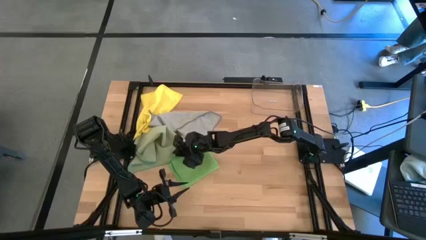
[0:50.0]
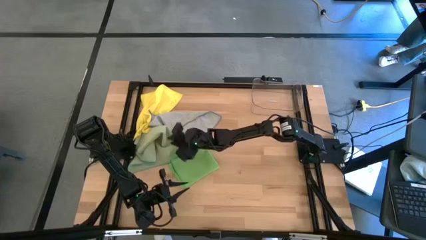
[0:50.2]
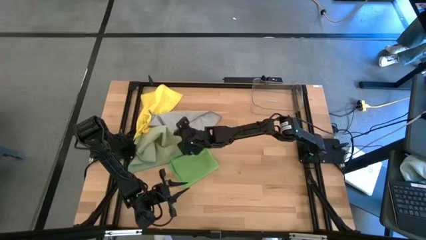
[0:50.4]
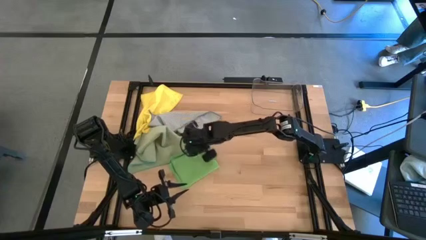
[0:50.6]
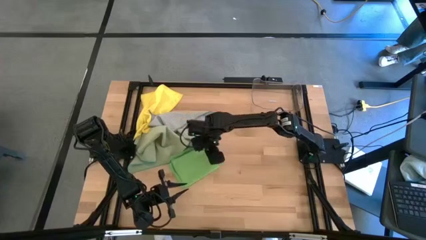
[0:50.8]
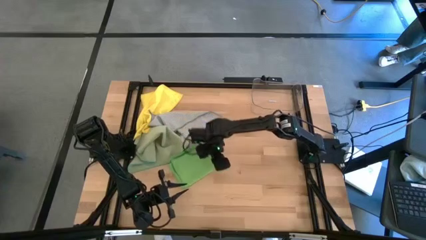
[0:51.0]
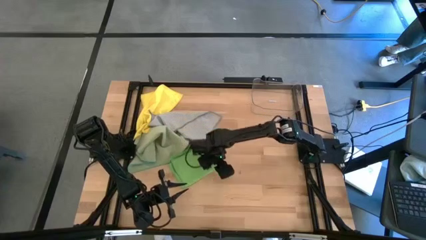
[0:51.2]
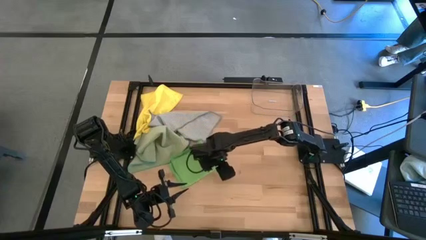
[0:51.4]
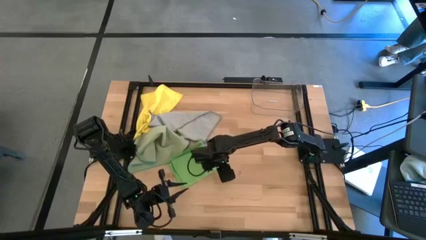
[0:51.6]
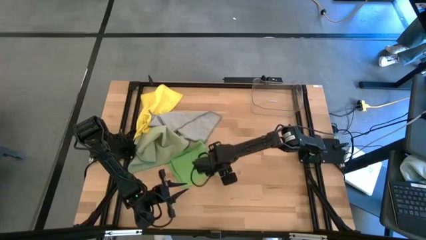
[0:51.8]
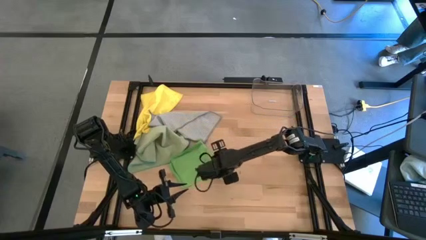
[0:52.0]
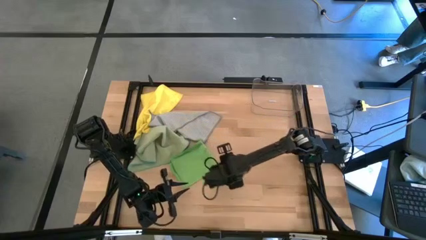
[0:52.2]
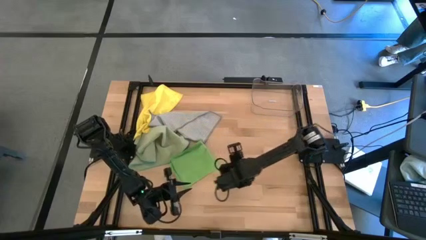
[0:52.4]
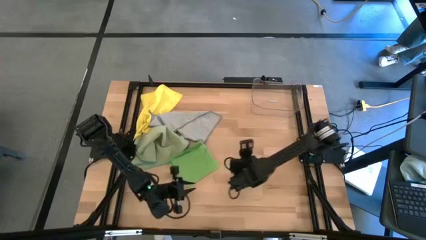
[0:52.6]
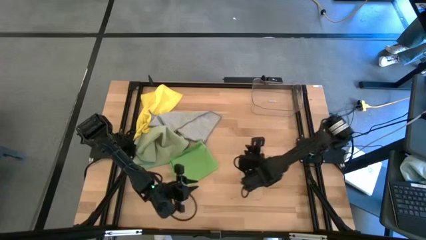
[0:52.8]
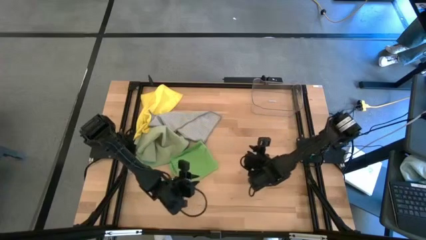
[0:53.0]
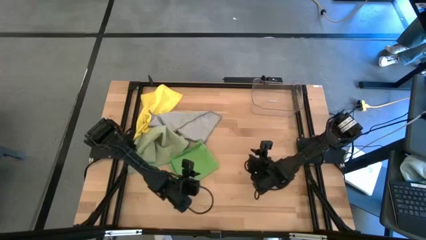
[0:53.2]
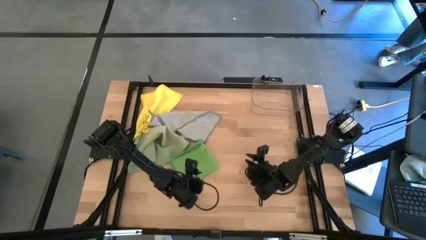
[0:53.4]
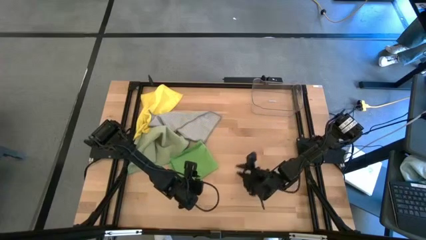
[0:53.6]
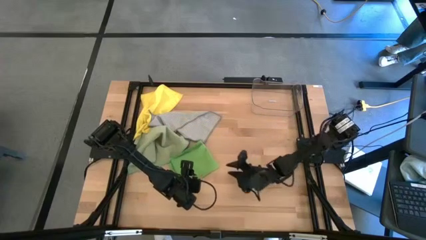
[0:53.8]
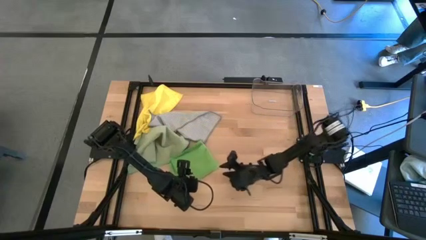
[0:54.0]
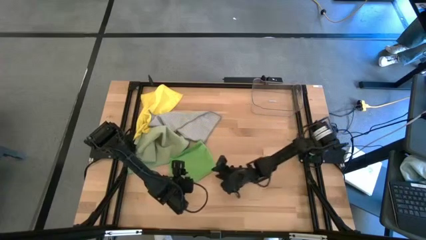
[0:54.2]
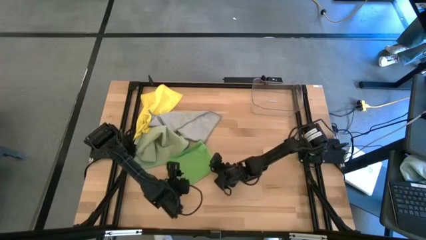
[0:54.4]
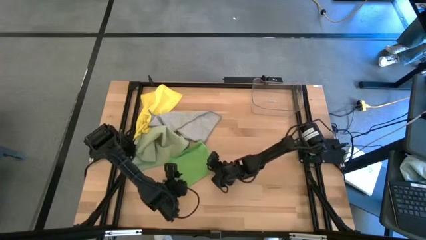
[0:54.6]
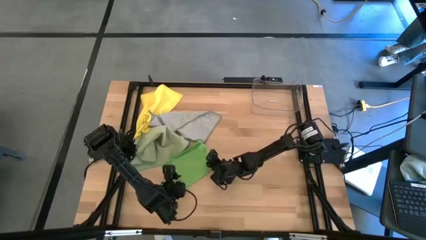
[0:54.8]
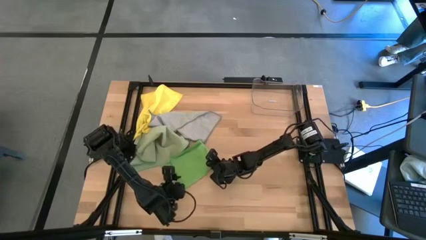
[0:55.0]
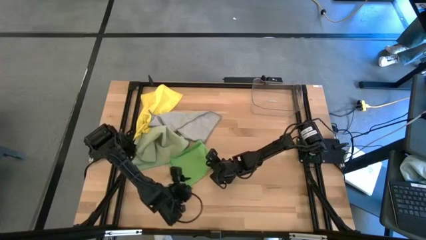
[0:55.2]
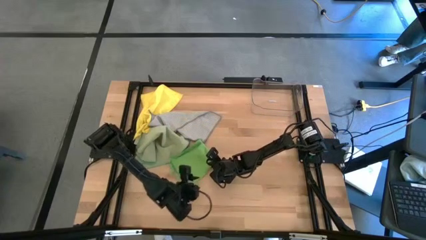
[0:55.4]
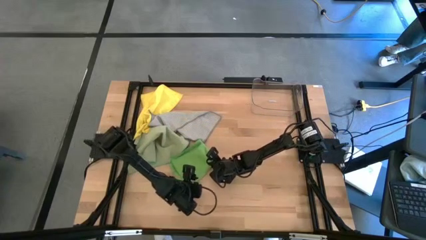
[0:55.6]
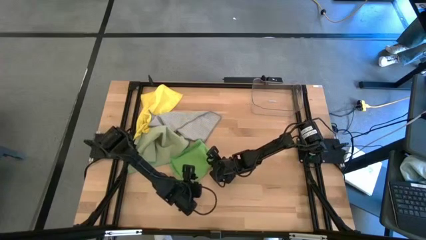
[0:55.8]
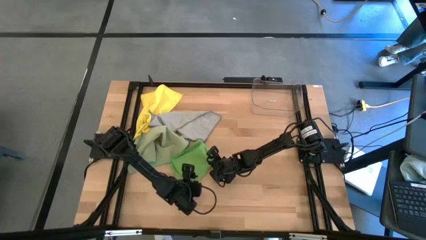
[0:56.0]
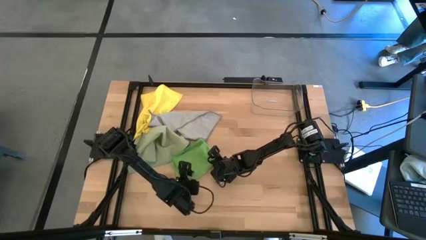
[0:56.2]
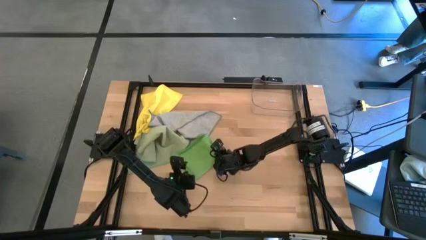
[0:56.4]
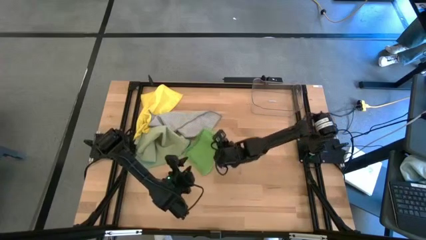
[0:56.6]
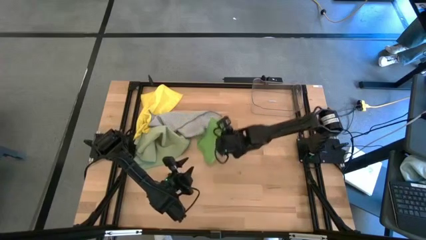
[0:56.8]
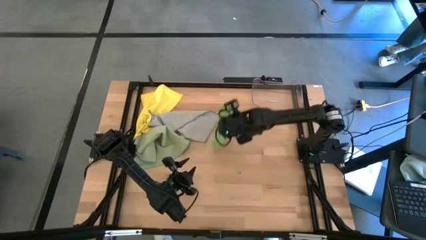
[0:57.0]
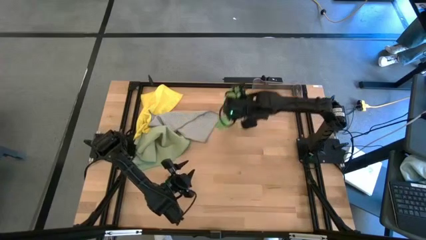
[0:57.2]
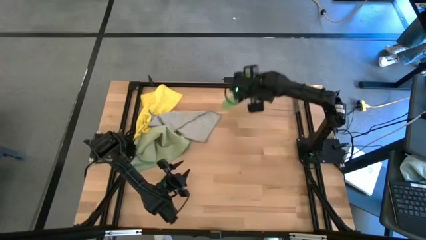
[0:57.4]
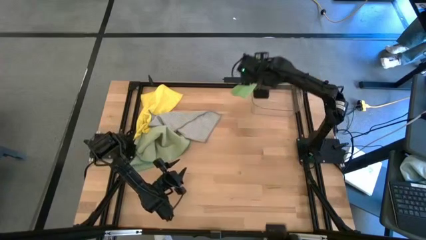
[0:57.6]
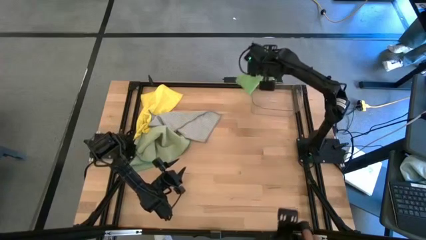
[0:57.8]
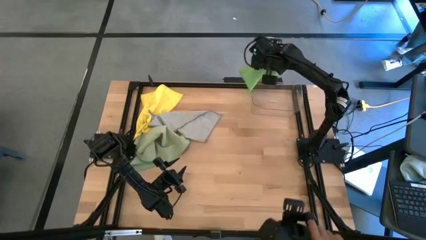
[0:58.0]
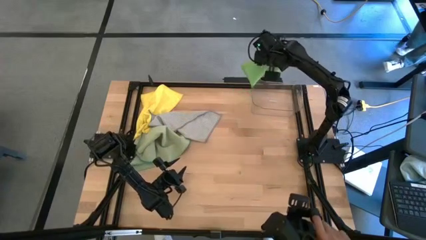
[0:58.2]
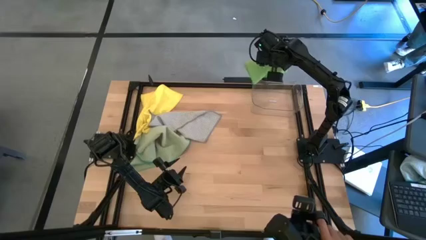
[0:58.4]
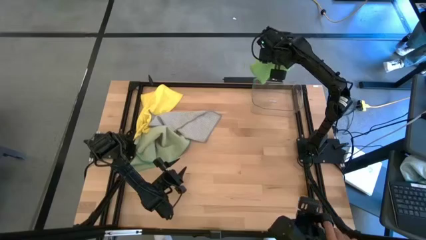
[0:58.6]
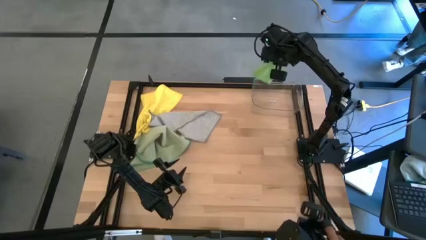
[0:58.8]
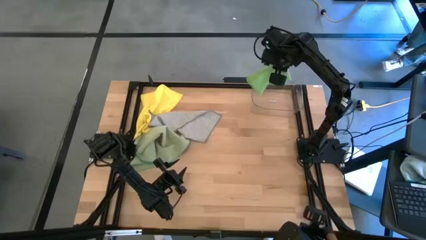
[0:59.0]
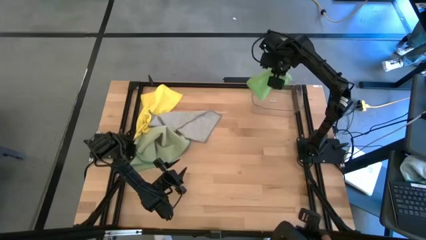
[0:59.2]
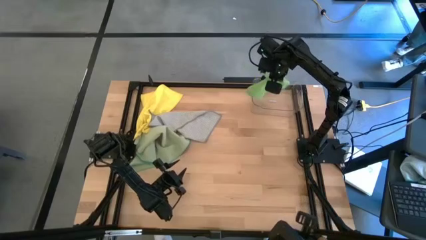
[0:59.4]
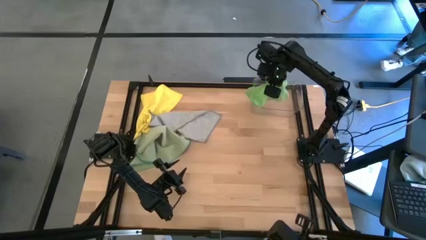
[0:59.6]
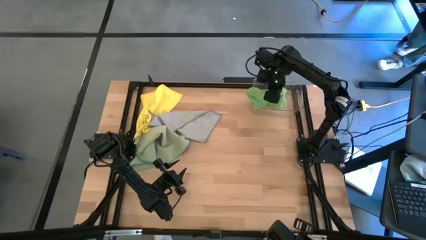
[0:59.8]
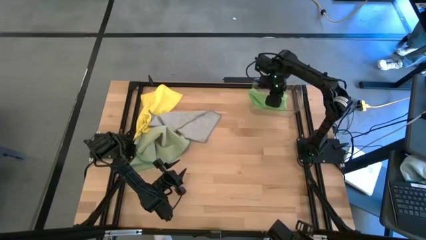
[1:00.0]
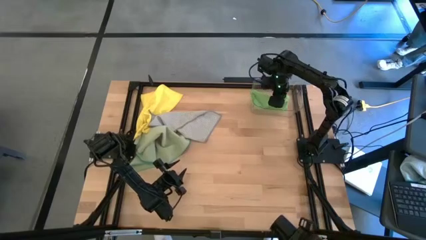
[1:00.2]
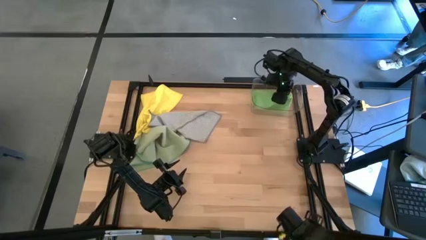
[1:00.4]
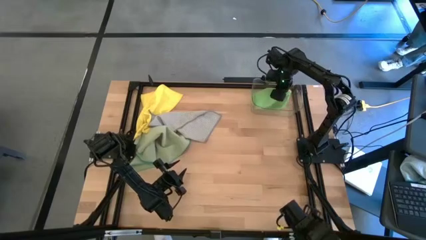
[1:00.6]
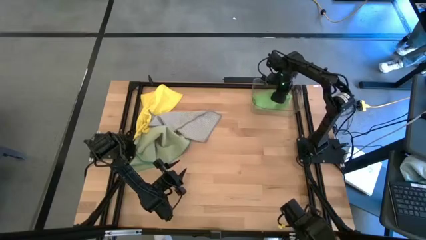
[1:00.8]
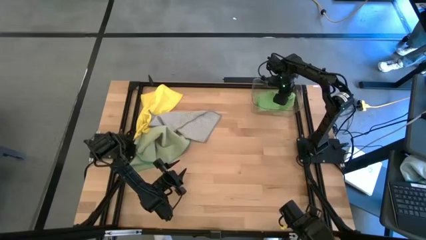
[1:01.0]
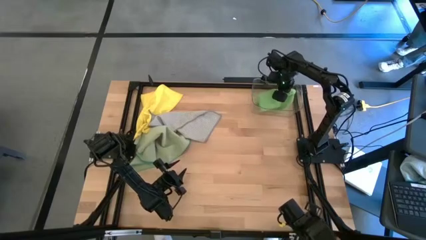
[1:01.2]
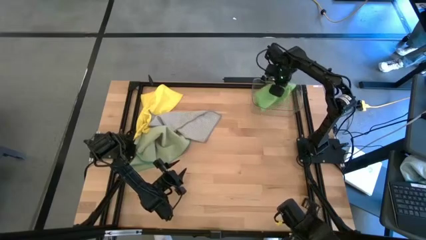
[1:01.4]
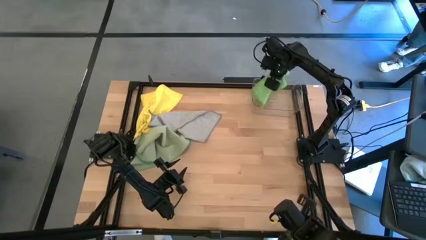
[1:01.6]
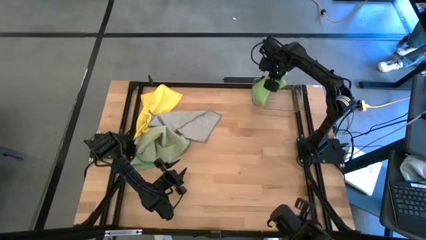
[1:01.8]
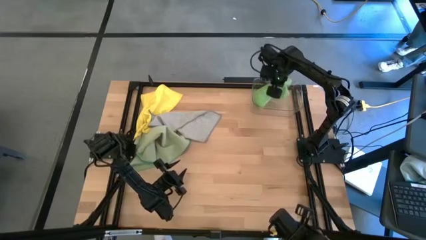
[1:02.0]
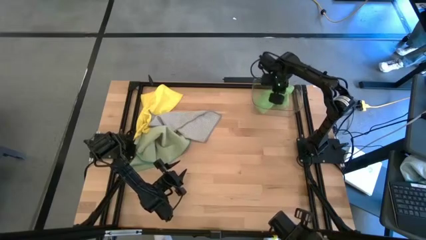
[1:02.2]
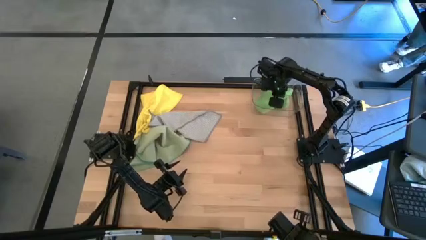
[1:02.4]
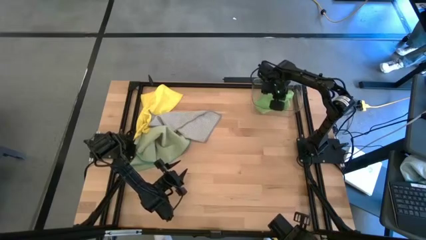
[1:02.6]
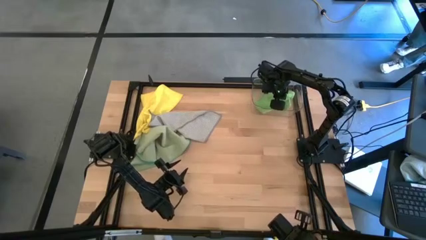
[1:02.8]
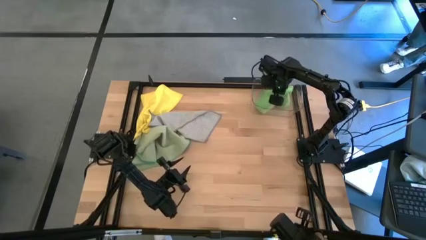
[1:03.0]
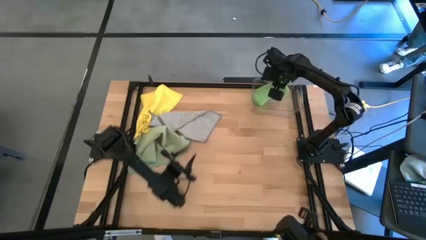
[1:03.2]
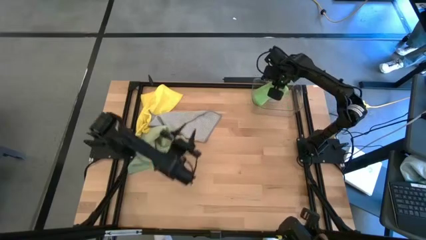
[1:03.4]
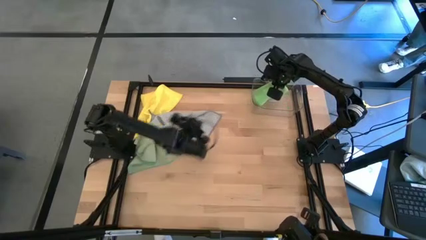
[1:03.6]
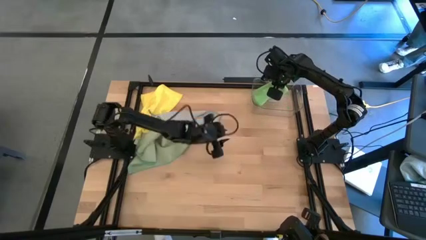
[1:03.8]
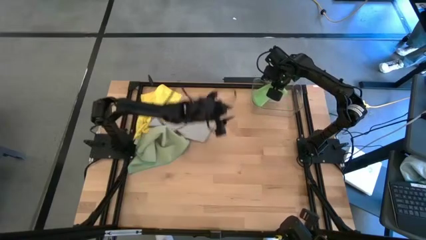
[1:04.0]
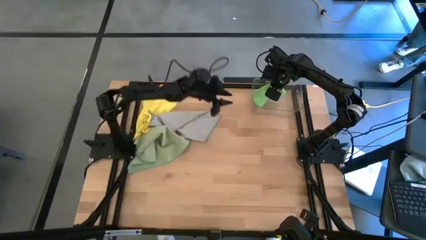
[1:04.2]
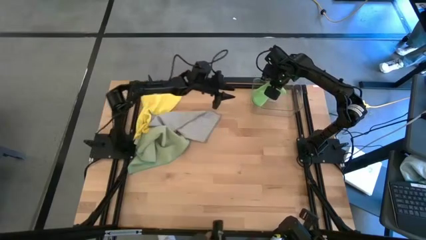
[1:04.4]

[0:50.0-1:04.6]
Task: Fold microfiber towels
Put the green cloth into the transparent bin
